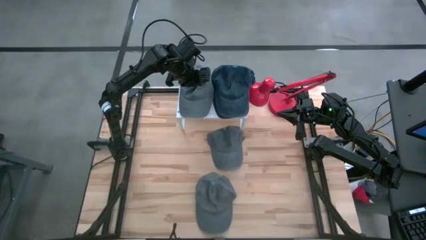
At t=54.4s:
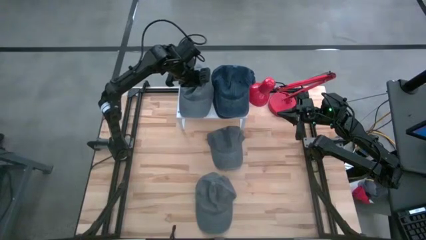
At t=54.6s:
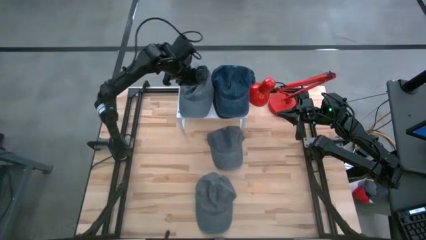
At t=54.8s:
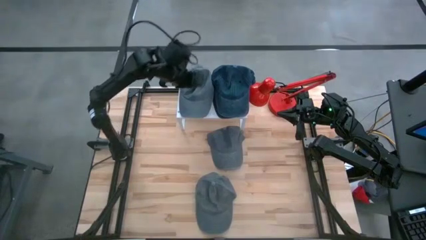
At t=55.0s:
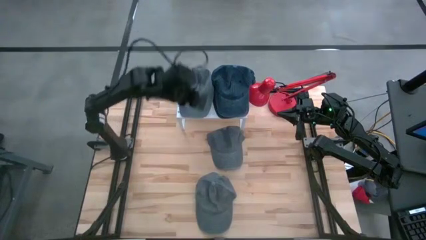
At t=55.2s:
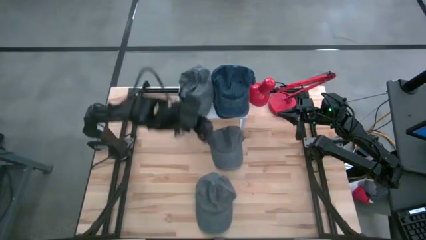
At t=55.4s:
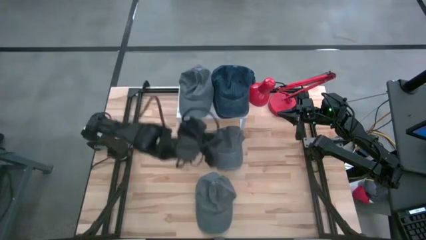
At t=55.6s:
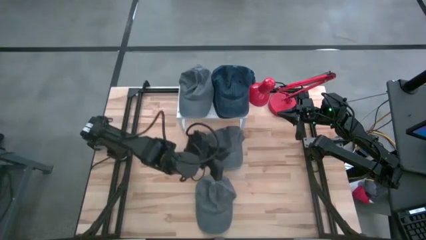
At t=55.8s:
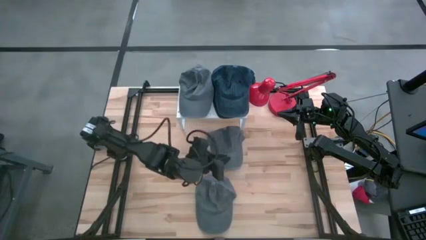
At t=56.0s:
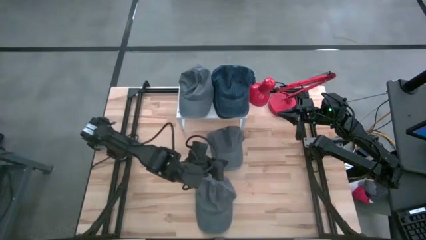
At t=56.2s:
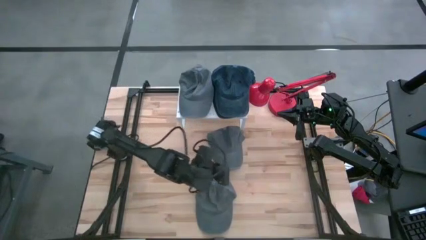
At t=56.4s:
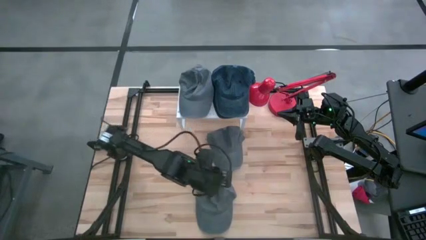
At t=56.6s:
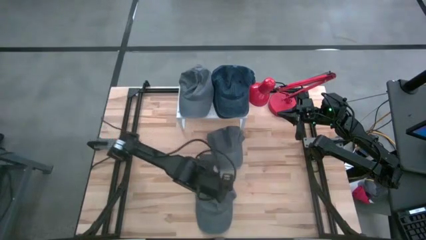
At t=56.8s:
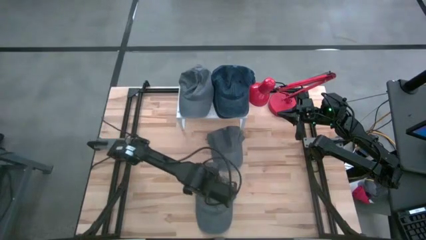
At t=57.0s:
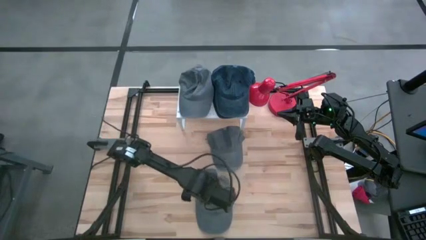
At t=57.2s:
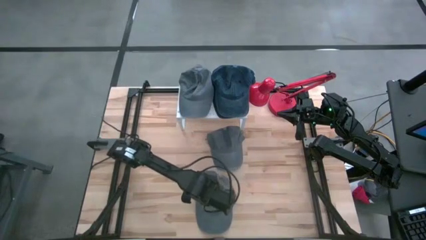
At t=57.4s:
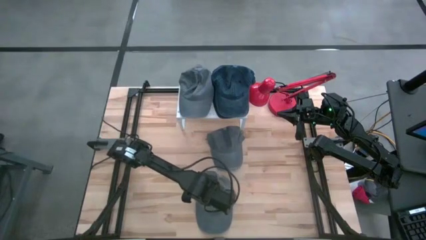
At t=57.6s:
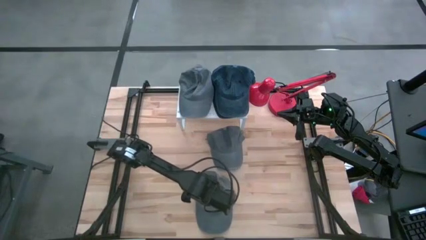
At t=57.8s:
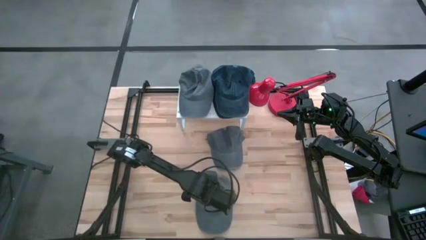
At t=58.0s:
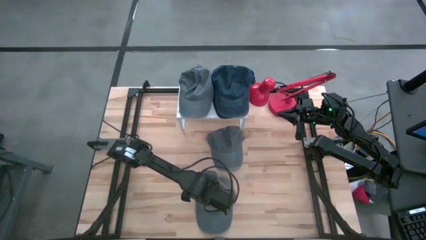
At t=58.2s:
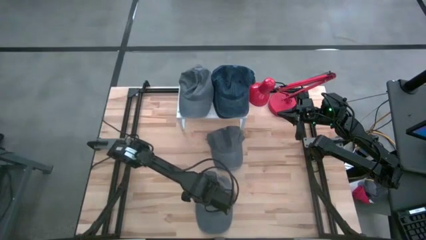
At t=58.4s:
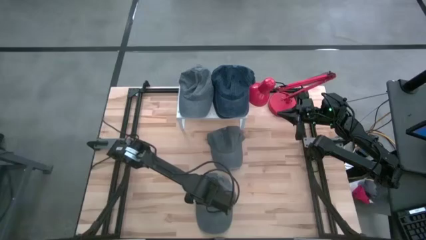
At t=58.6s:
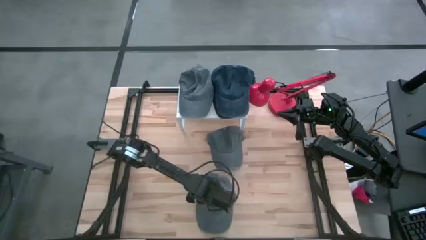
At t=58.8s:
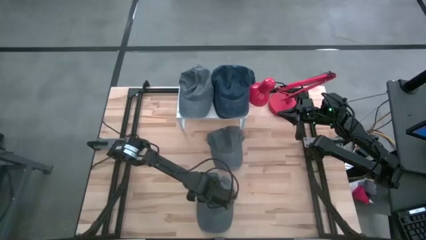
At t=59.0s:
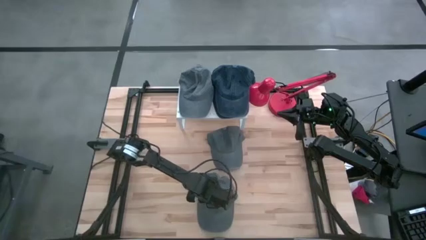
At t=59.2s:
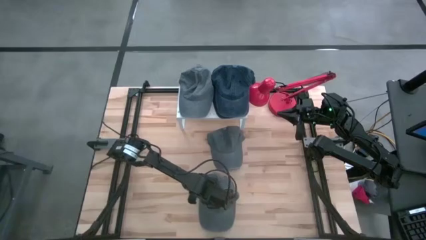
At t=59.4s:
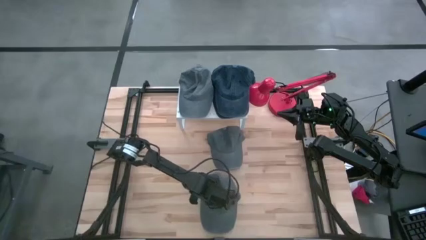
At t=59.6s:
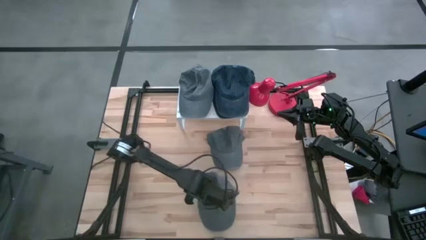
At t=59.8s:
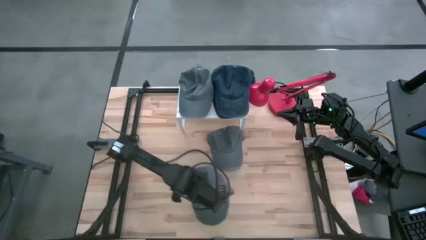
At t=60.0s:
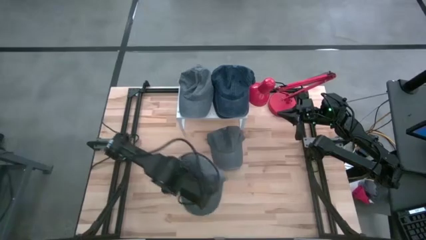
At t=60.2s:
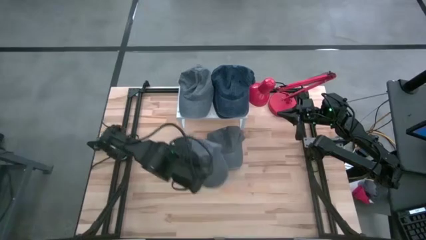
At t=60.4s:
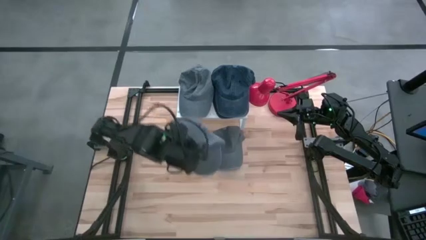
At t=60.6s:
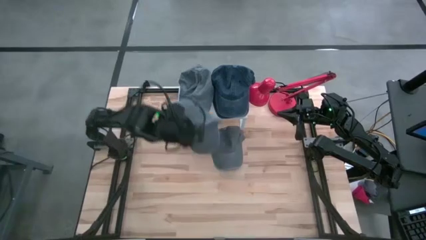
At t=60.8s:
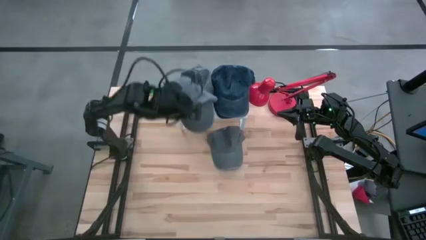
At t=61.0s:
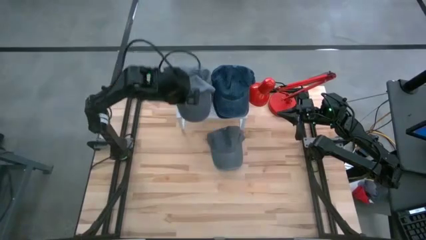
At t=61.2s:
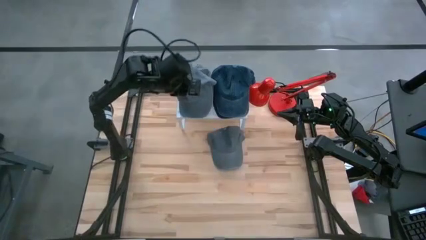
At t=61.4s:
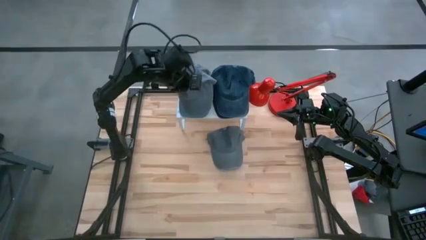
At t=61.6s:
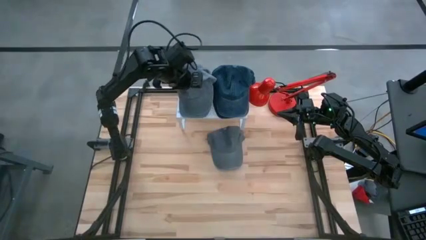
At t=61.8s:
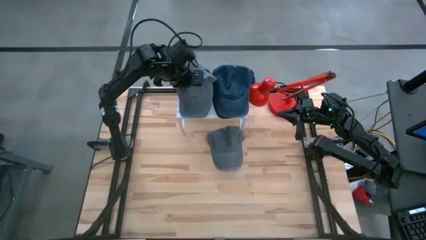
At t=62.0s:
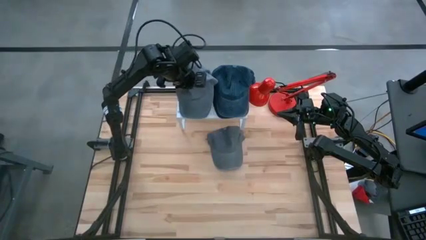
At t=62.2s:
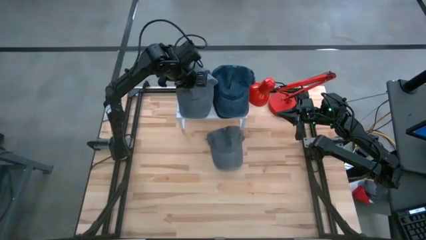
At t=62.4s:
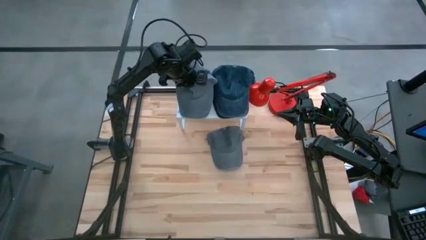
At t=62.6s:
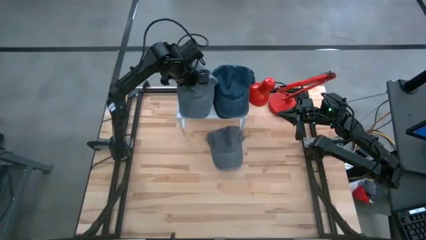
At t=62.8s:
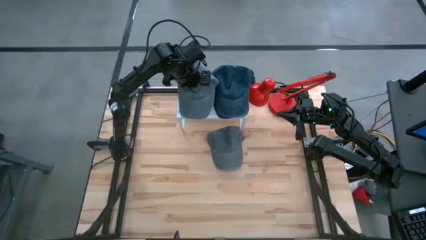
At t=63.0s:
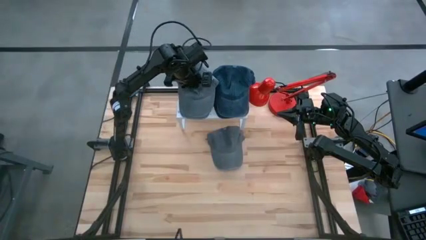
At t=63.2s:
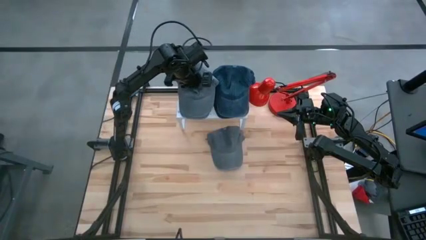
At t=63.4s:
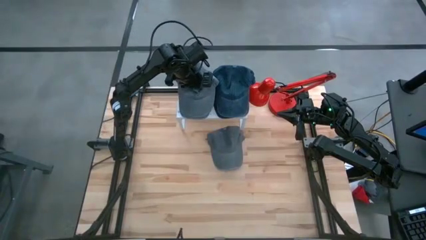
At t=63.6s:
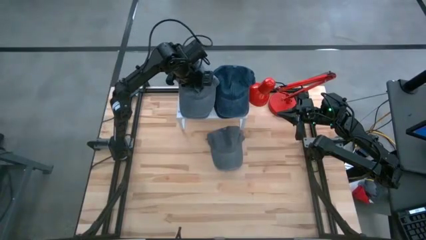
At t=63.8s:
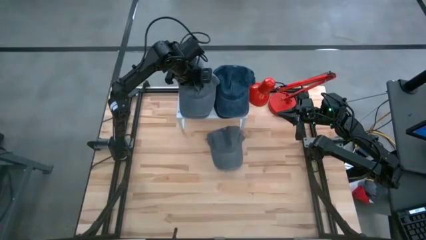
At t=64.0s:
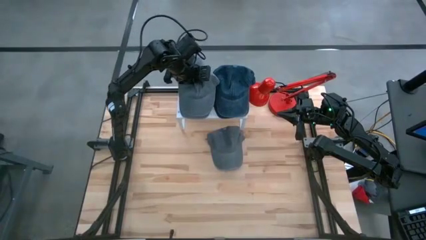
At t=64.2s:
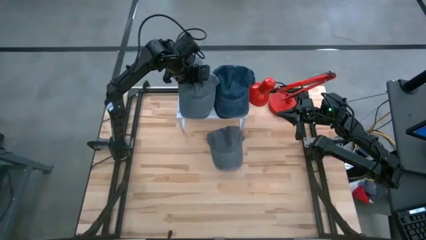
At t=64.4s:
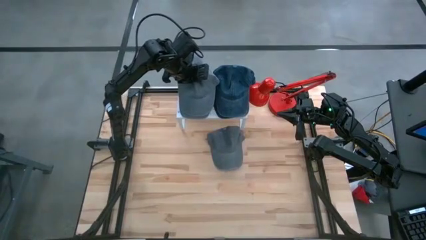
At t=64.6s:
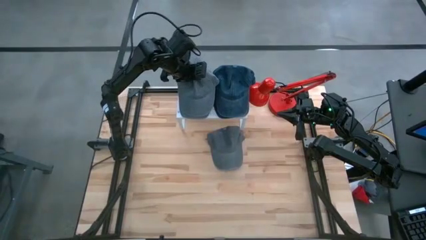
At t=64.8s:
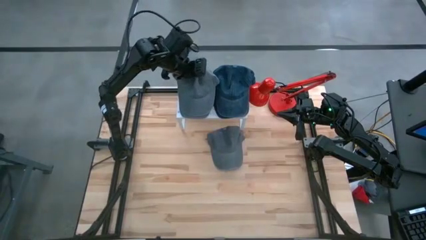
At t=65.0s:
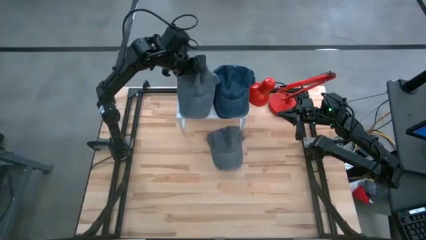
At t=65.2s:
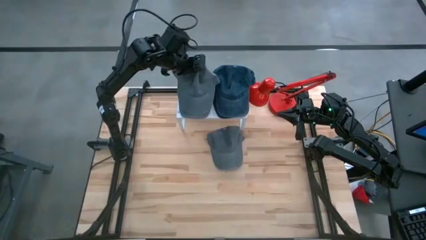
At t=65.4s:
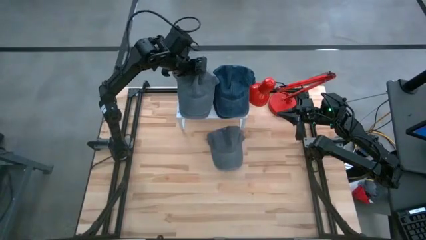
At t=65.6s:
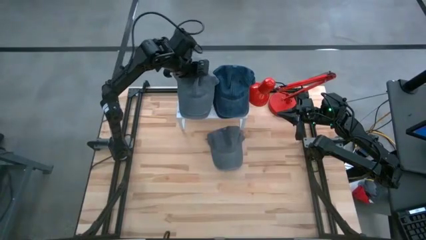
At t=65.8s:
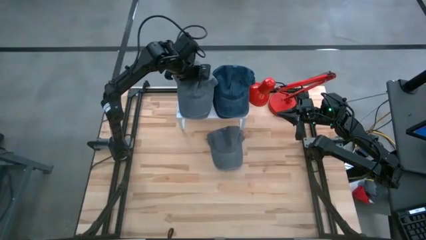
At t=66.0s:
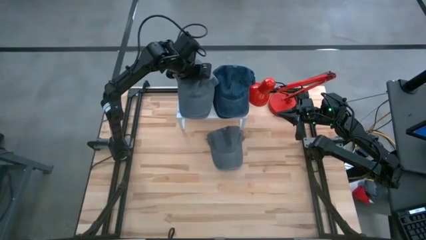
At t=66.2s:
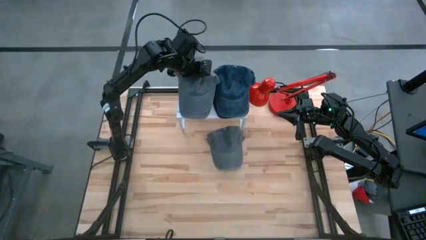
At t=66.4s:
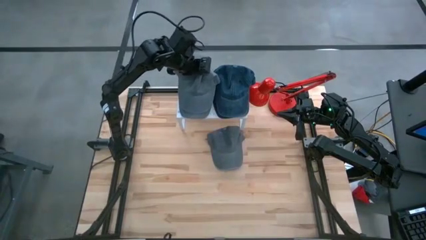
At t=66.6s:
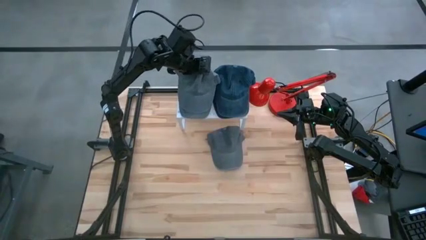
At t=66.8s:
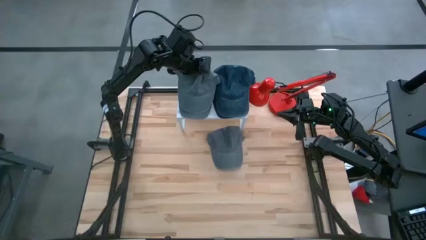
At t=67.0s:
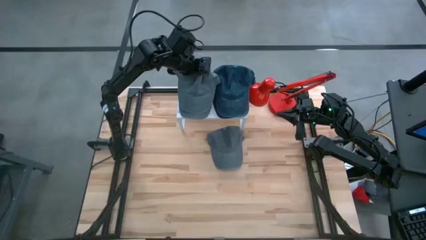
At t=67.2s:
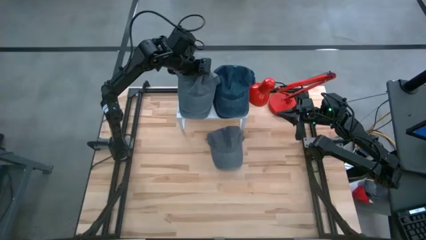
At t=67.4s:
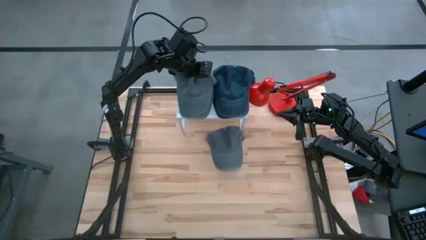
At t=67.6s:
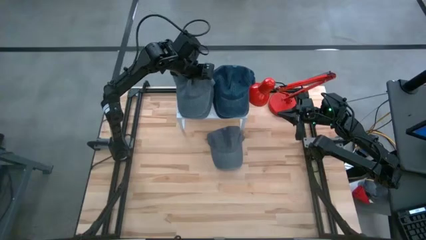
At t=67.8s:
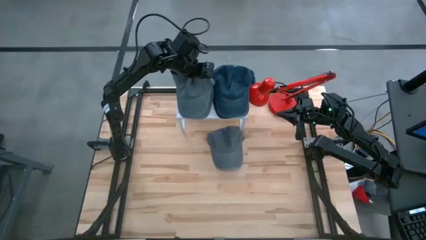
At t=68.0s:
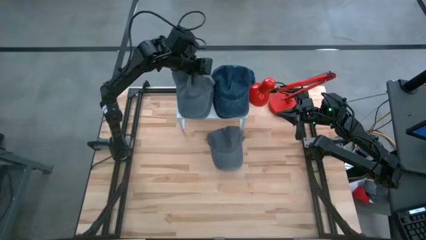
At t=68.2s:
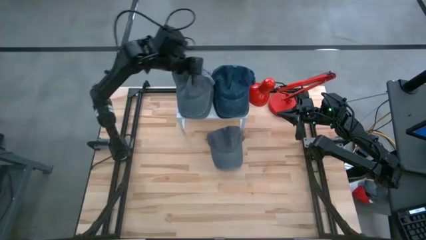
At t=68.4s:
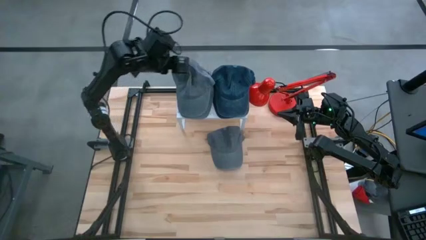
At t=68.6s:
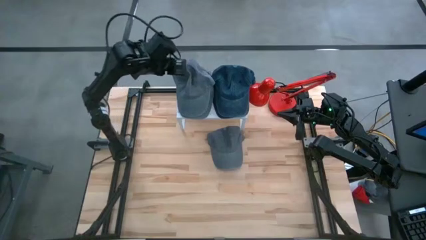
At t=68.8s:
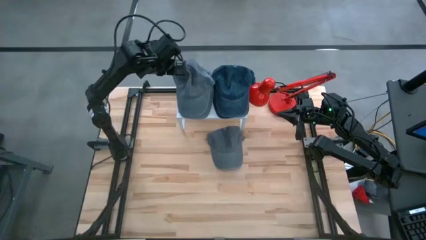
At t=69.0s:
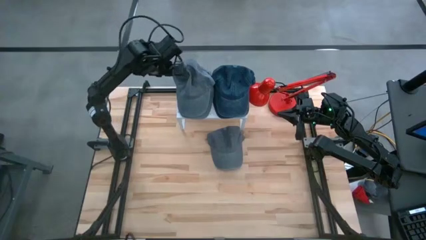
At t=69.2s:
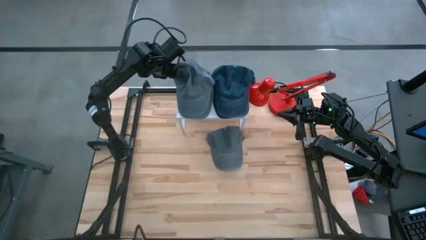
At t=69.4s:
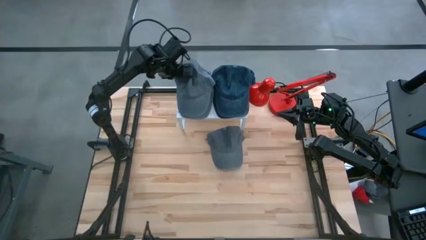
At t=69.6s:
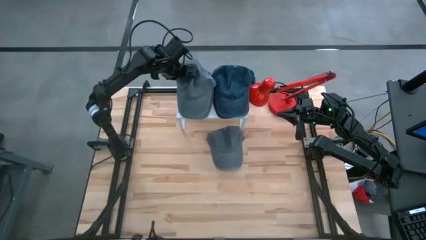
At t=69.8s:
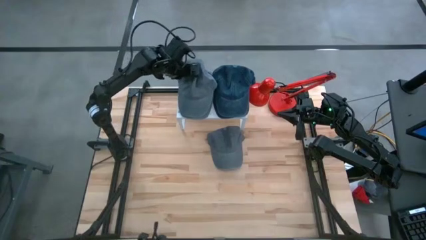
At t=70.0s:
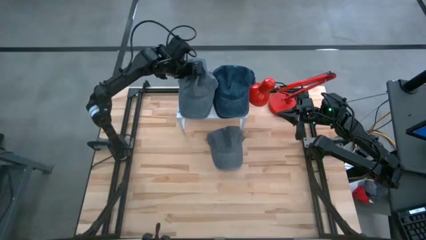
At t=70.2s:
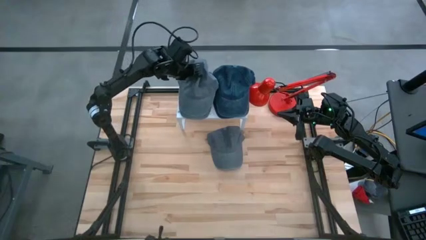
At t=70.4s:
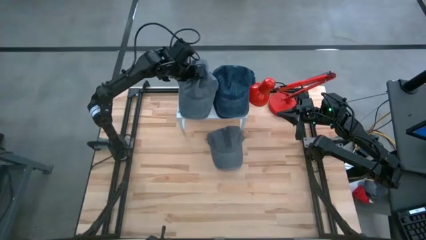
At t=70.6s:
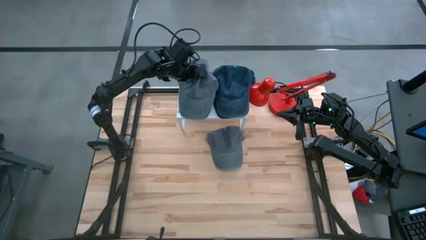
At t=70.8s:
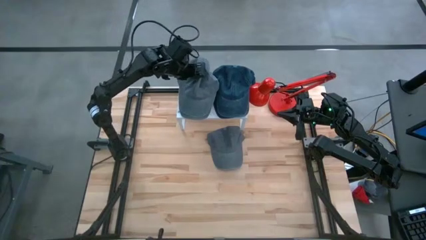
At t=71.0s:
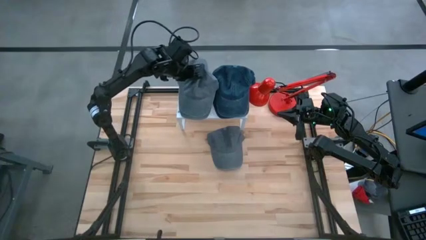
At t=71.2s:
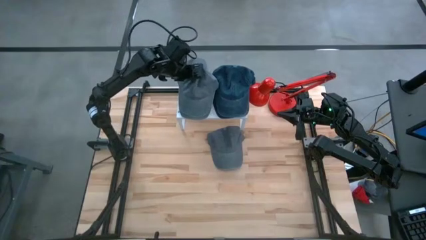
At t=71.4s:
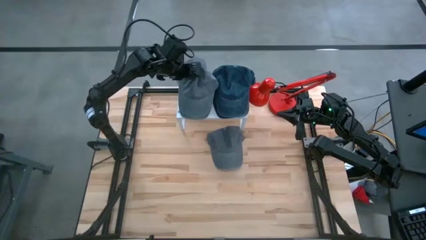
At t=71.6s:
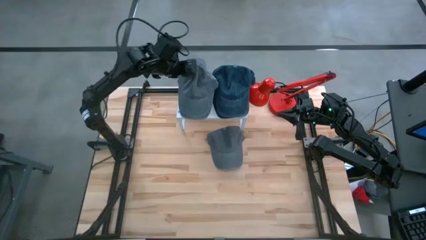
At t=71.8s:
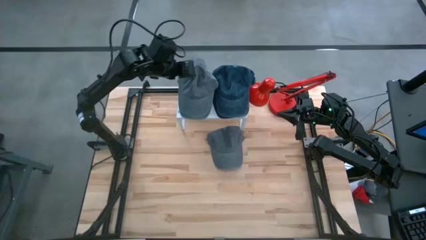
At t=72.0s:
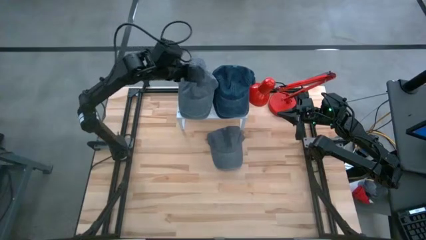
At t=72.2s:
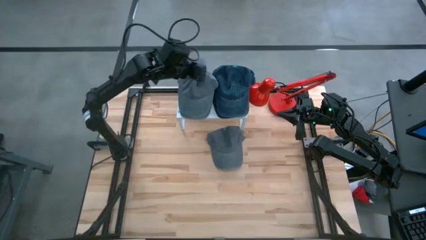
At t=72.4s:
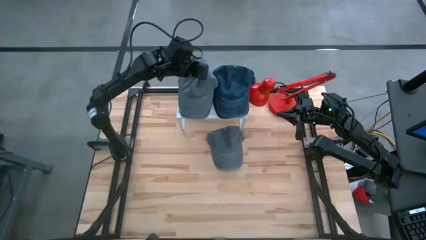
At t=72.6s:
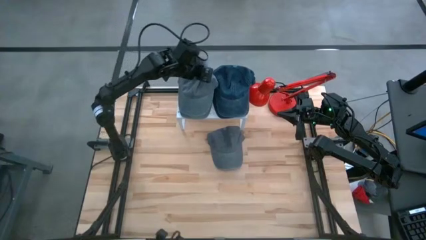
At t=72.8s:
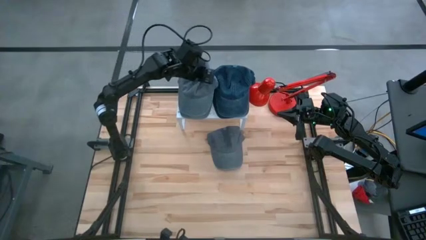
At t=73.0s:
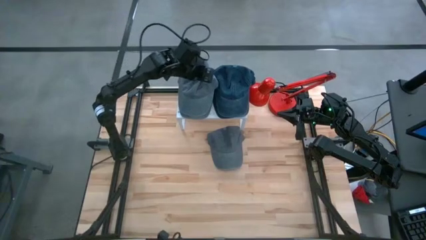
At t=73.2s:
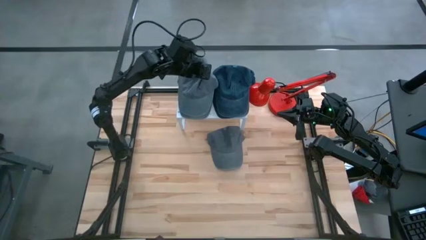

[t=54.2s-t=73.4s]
Task: Pick & Place hat
Stack the bottom light gray cap on the top of the other light gray cap on the shelf
